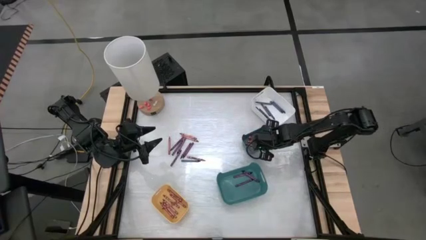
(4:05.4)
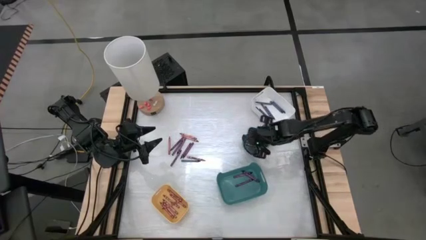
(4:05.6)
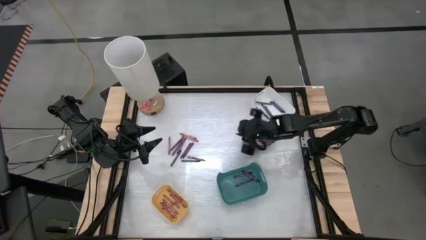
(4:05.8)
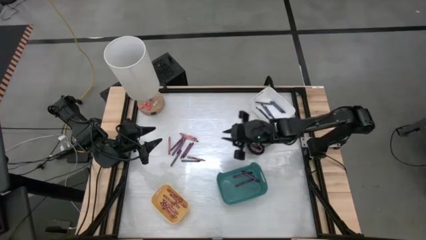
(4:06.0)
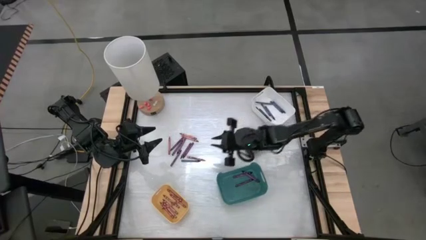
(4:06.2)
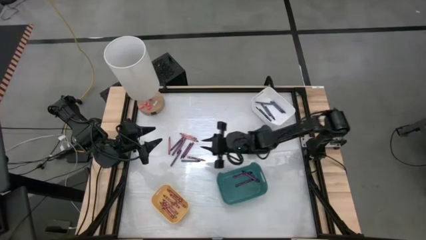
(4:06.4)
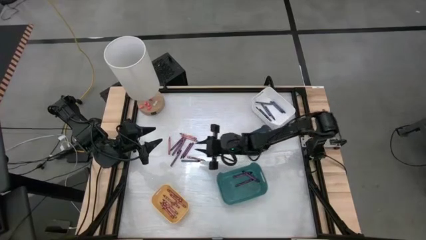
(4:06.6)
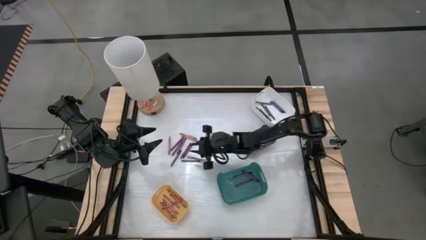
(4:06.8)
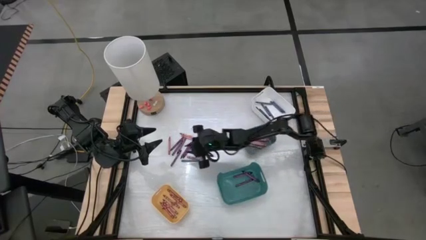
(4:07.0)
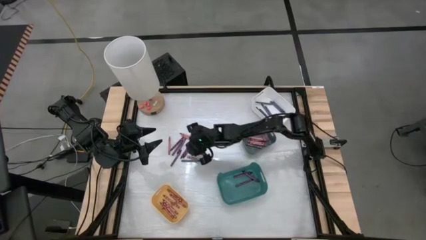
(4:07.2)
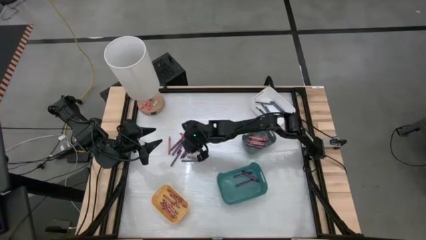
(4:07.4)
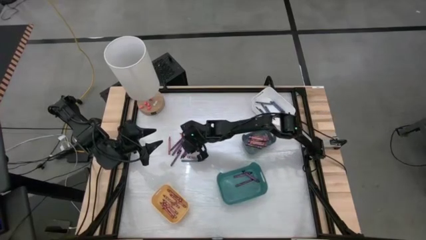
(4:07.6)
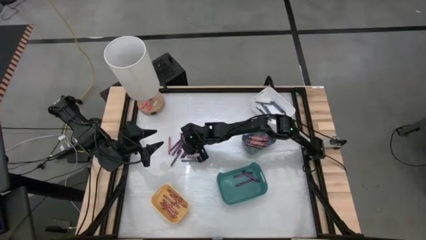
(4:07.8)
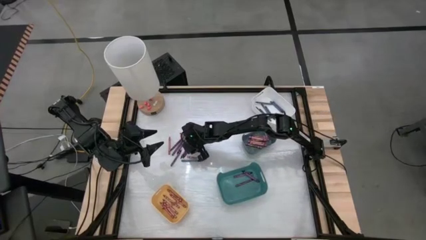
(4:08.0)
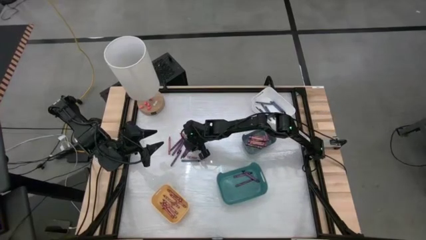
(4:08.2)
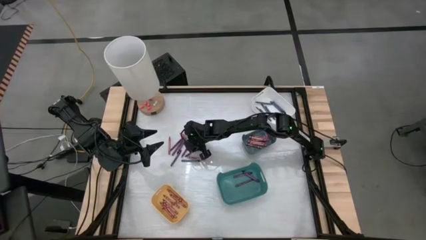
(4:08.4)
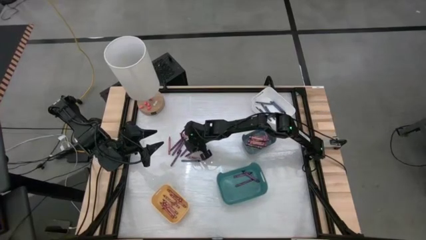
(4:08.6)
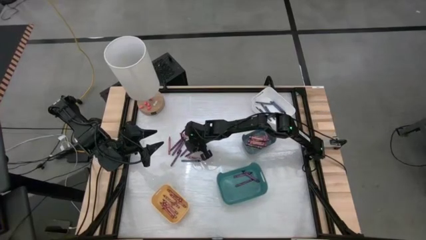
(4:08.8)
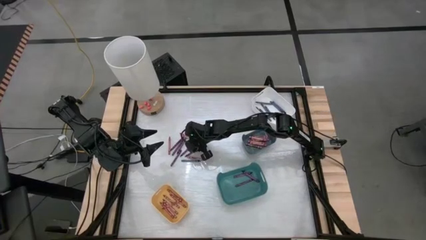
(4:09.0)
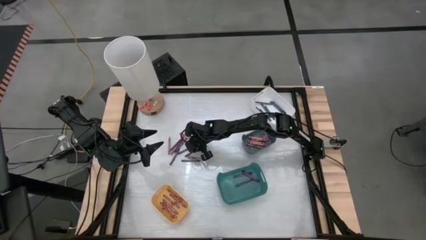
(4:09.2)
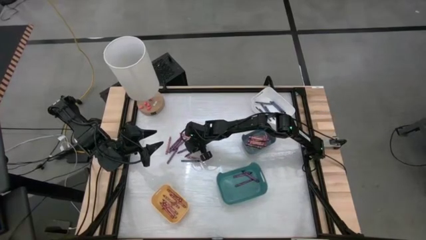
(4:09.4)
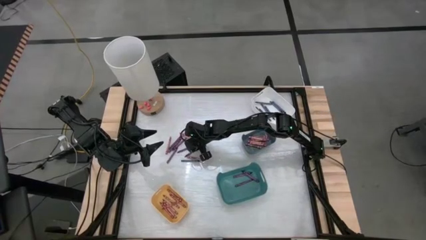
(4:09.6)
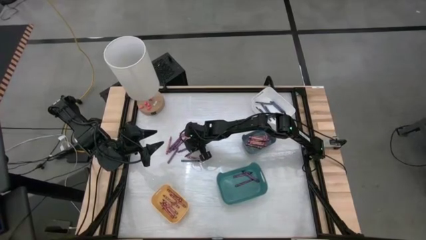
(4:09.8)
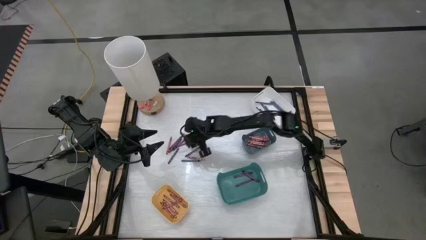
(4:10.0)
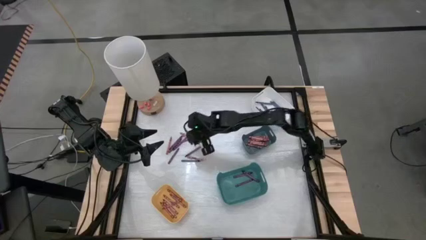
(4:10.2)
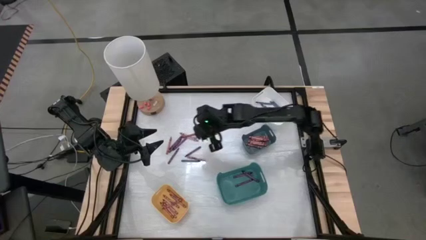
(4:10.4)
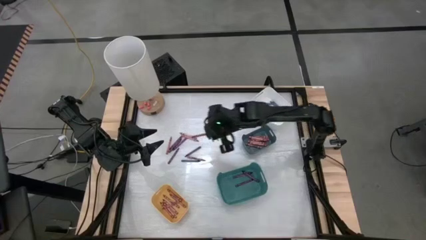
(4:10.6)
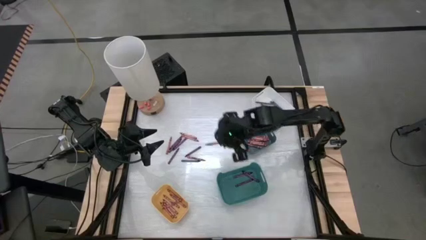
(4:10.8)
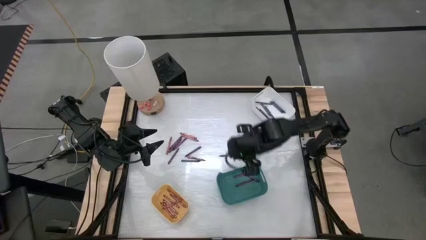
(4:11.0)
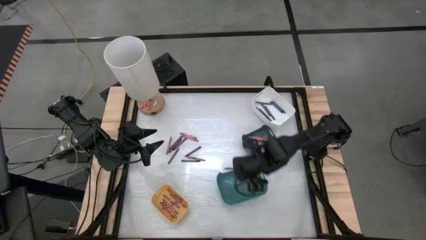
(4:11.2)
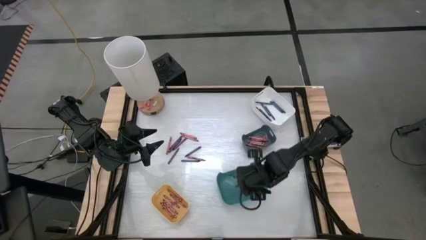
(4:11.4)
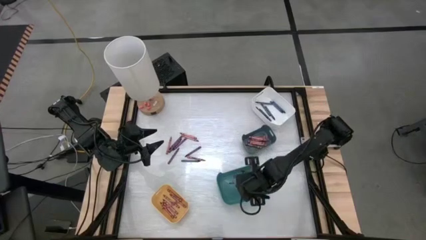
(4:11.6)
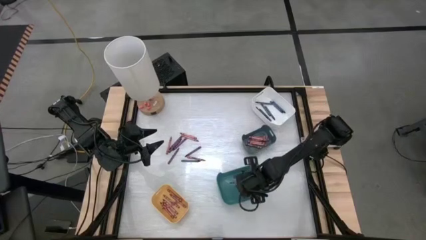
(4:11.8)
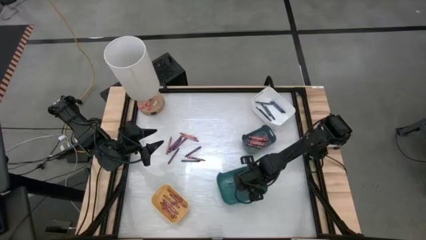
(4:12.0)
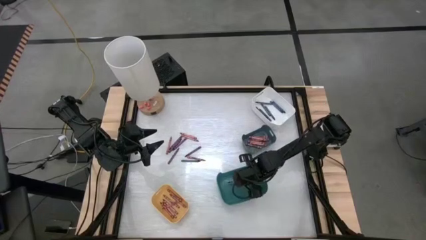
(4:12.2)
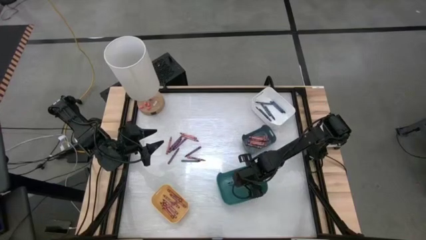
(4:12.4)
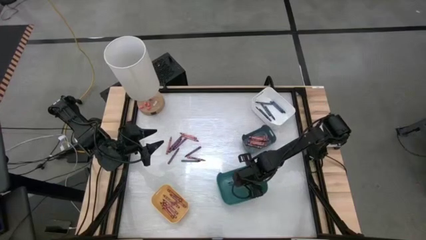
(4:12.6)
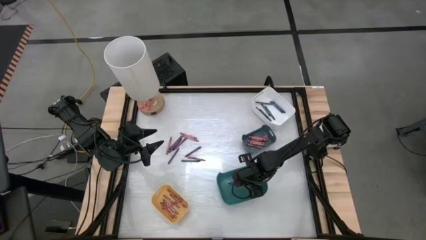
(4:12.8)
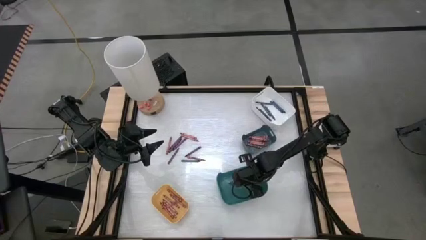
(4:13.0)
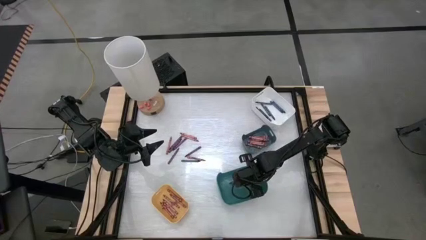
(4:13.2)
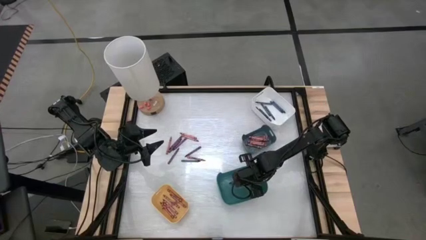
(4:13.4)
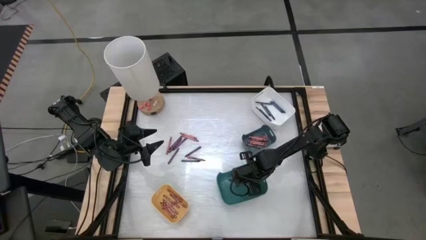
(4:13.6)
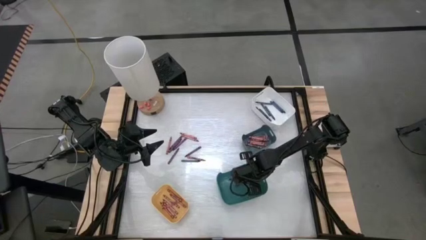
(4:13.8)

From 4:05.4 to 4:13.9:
Task: Sort crayons
Put the purple crayon into the blue bin

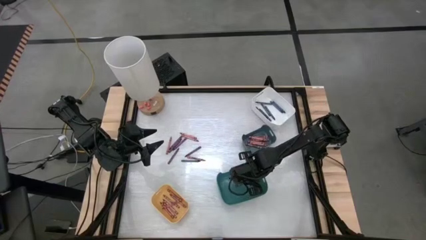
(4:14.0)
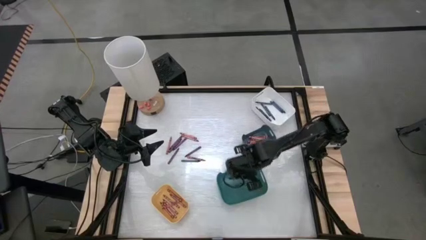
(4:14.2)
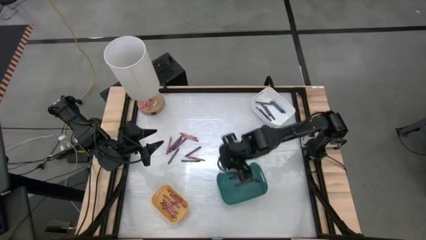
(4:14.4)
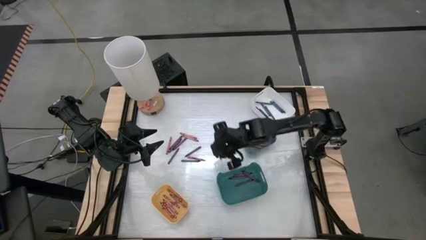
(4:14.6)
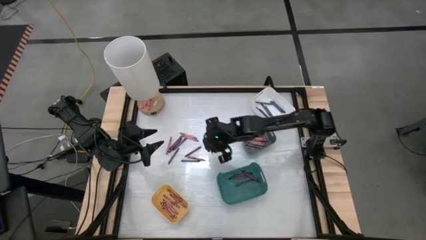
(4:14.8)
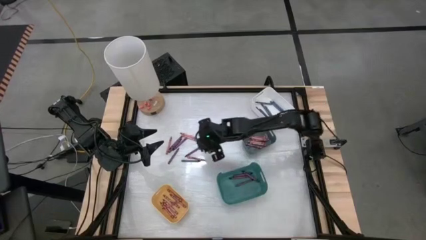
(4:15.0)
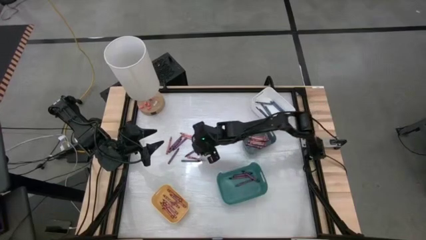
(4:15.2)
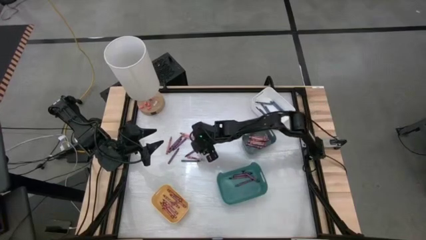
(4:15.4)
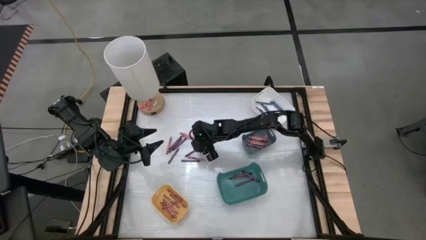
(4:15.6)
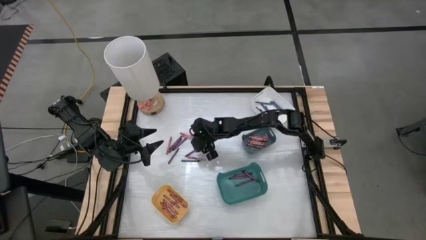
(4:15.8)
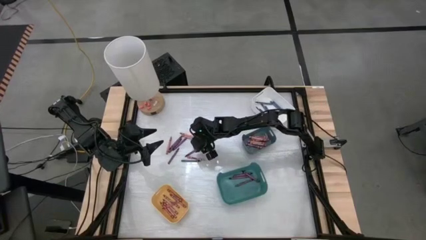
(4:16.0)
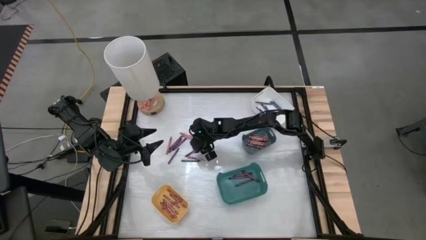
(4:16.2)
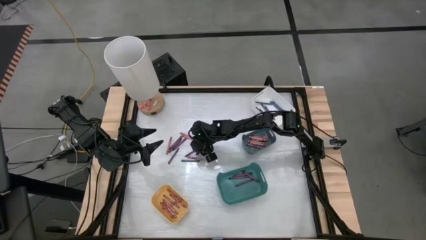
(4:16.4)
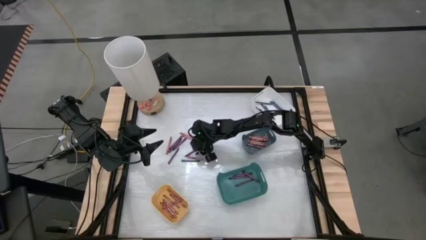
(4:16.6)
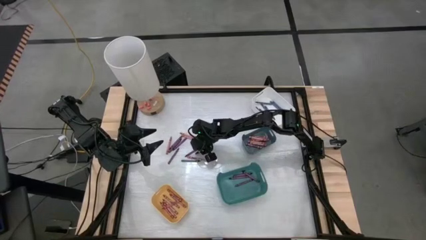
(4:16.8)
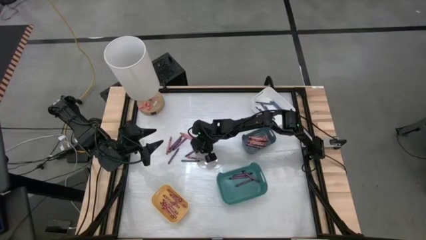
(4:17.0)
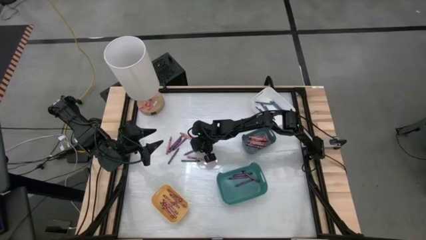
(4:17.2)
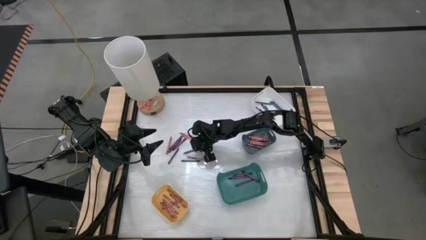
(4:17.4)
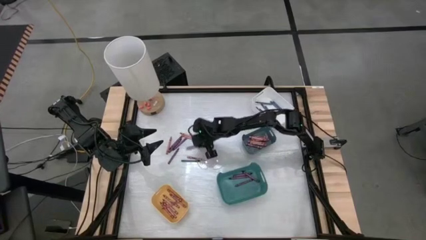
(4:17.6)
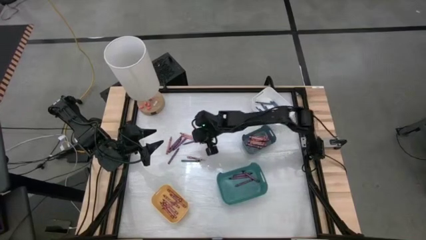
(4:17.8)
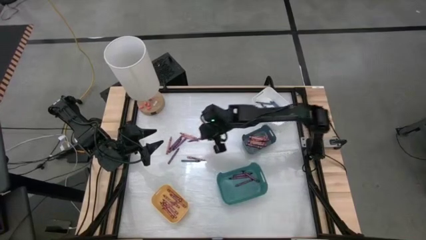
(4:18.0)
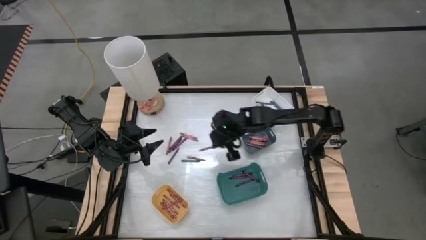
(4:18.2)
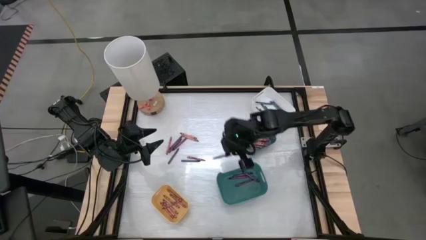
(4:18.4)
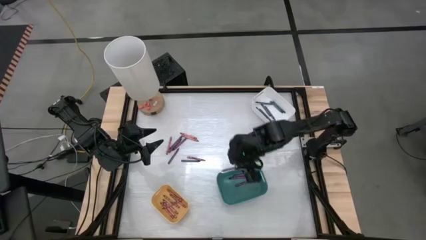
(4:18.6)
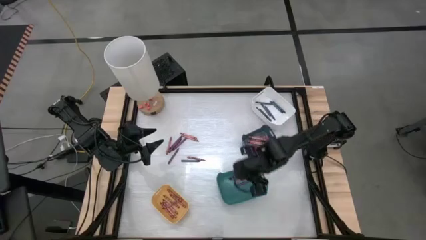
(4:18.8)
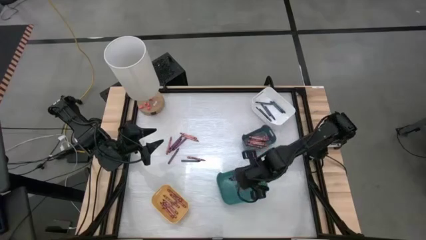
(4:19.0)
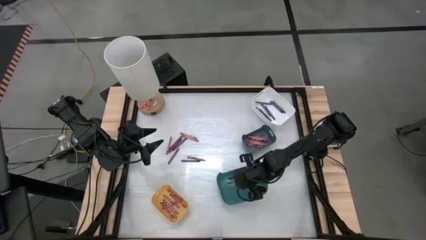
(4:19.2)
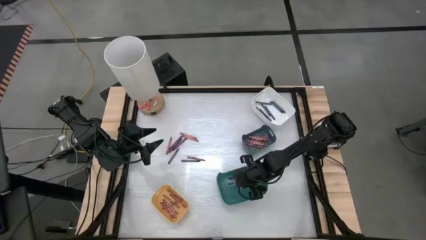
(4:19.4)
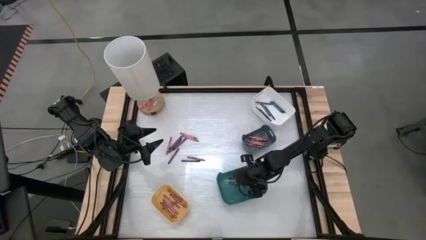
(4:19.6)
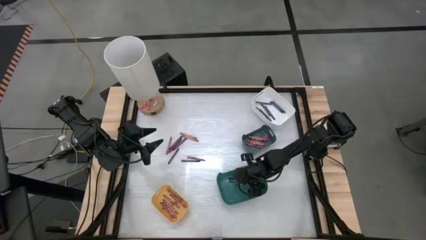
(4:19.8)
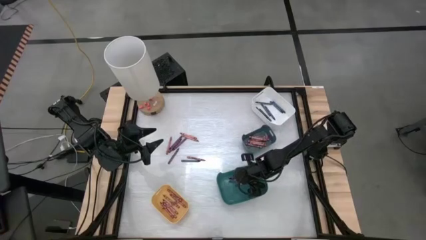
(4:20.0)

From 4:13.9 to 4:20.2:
Put the purple crayon into the blue bin

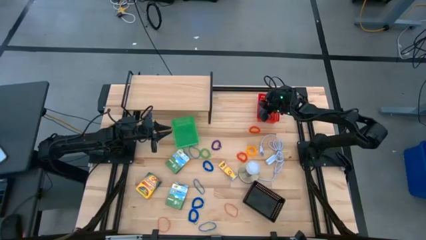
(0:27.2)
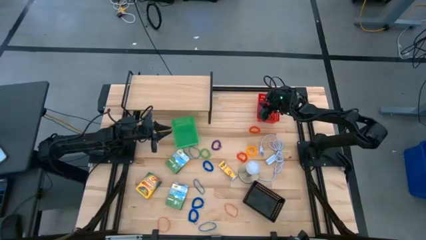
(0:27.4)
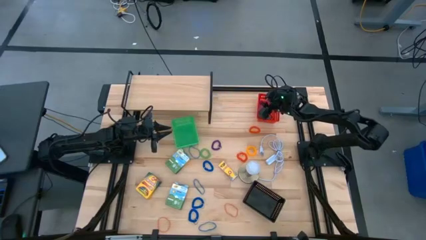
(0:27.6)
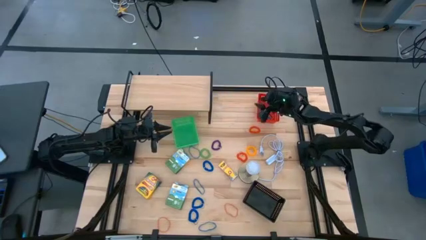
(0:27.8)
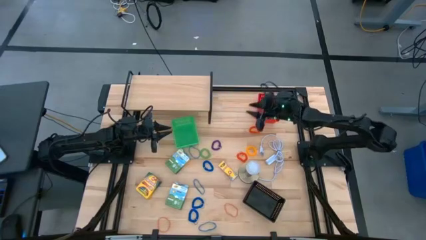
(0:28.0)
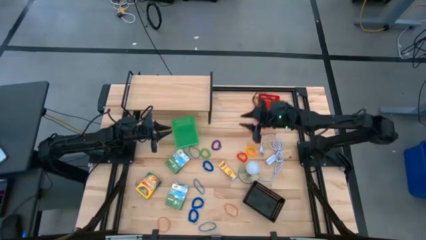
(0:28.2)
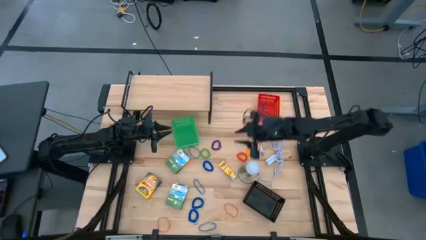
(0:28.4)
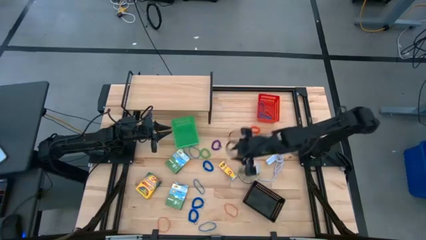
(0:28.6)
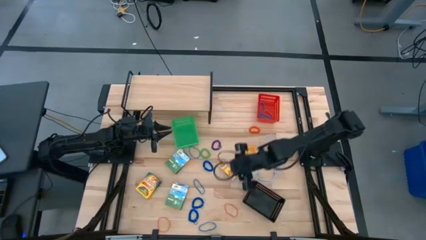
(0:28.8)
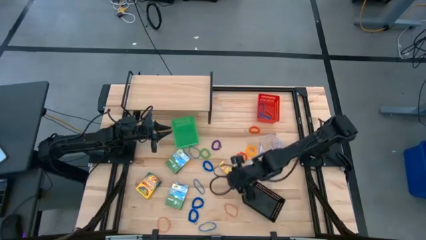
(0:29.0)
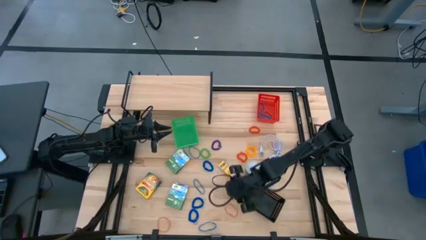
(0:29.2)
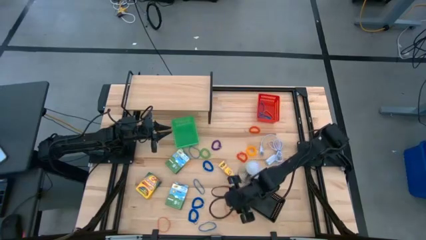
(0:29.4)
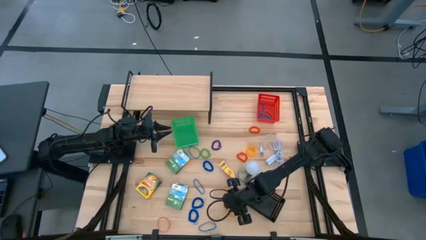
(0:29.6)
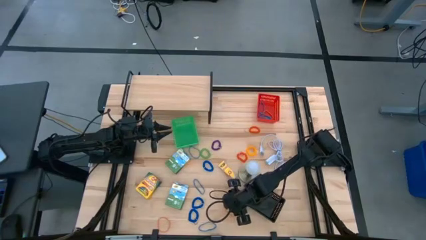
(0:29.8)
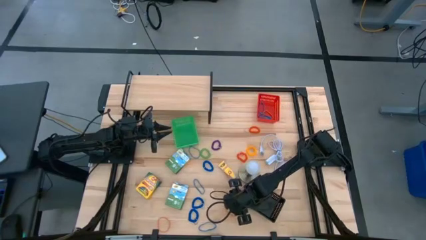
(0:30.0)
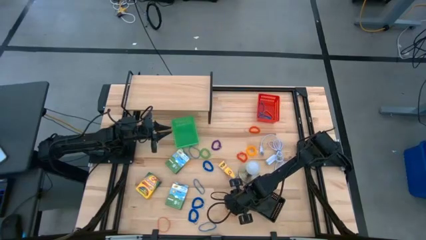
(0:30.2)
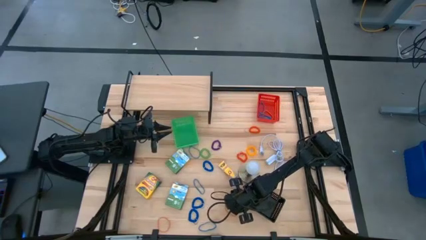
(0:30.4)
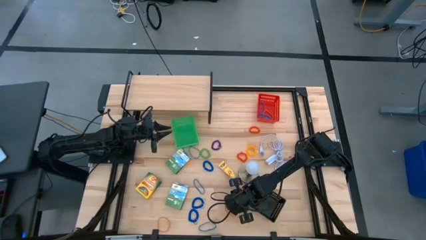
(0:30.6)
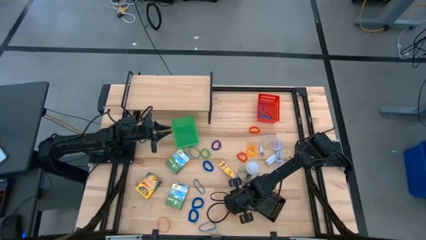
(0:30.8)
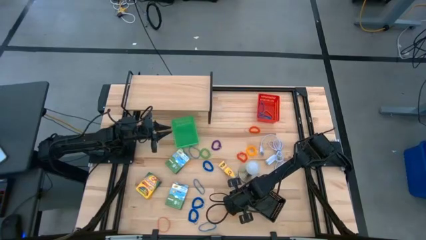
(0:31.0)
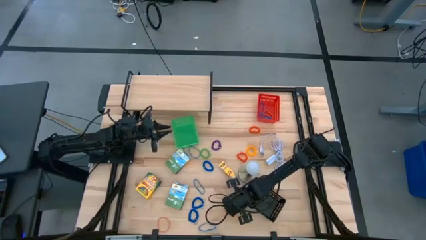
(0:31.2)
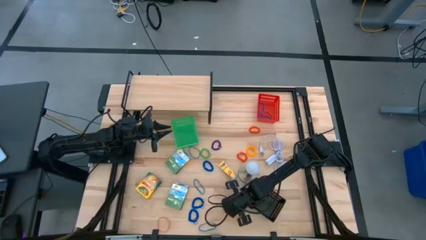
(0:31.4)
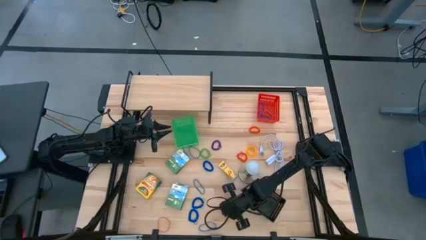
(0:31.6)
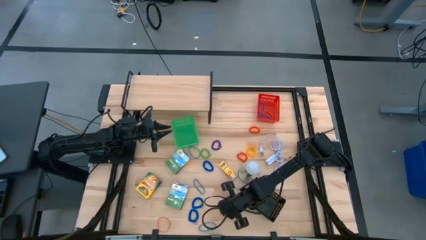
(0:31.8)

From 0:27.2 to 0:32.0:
Task: Pick & Place Office Desk Supplies
Put the orange rubber band into the red basket
